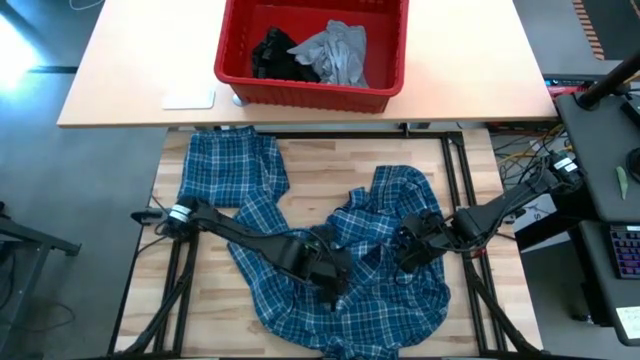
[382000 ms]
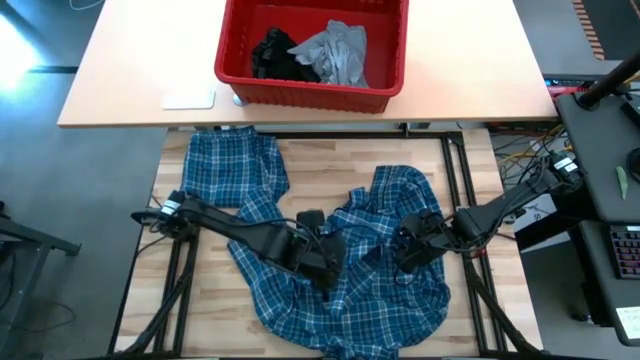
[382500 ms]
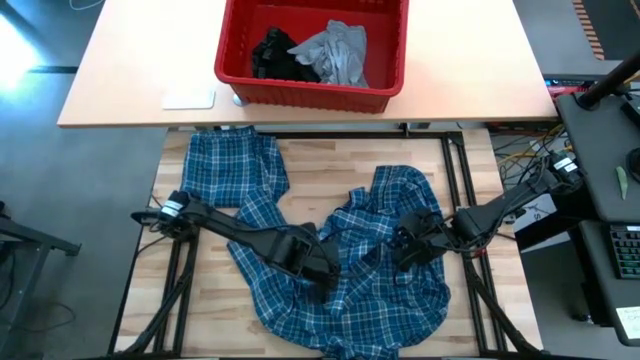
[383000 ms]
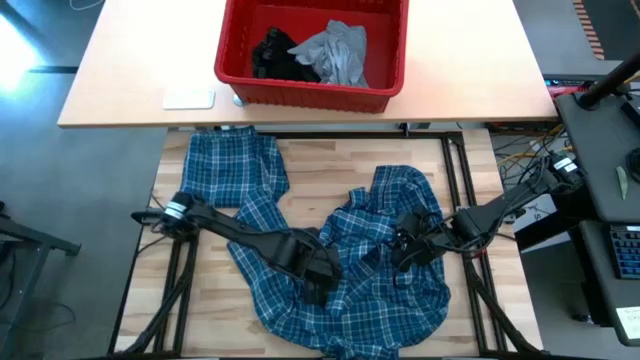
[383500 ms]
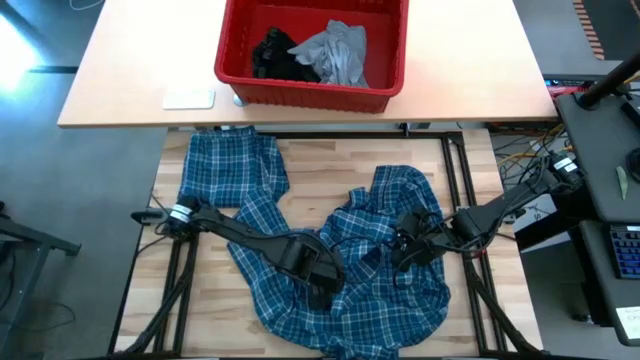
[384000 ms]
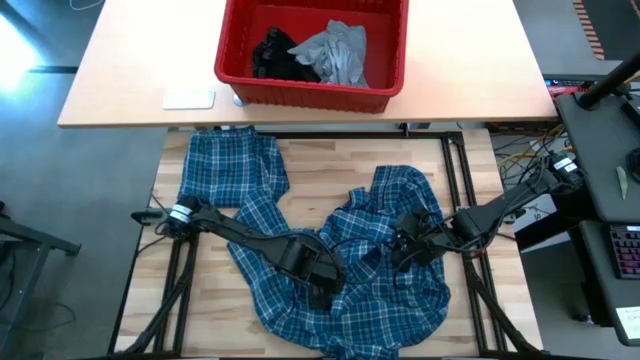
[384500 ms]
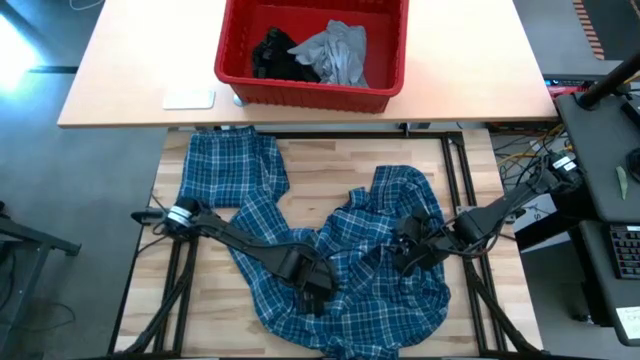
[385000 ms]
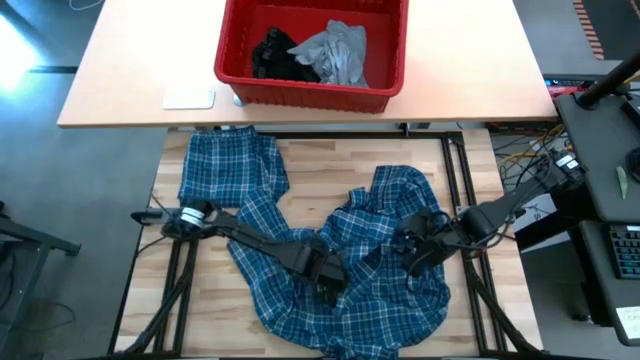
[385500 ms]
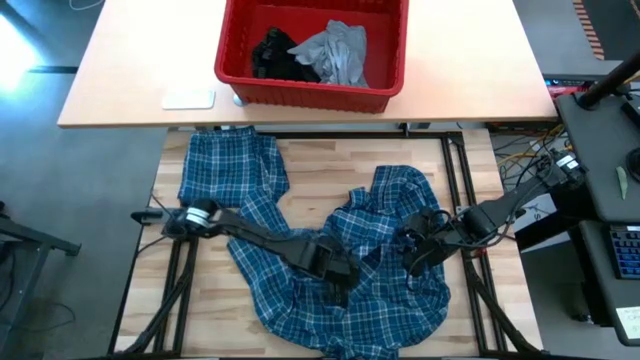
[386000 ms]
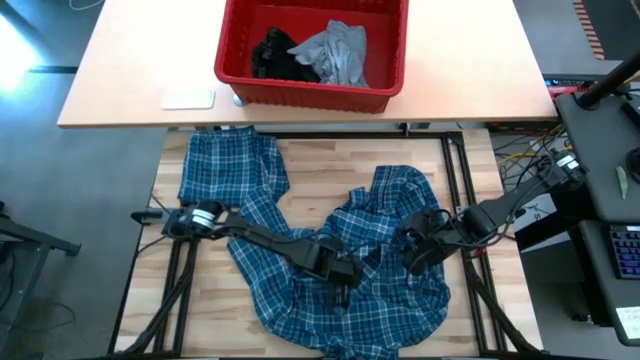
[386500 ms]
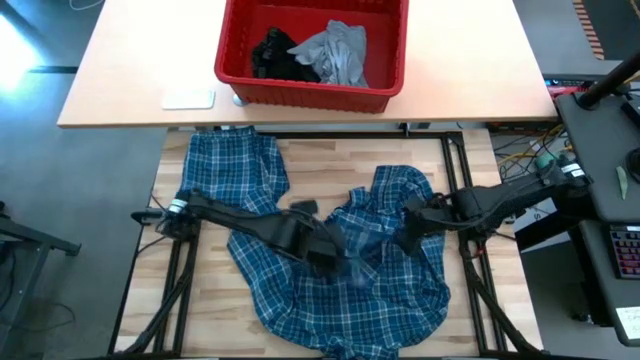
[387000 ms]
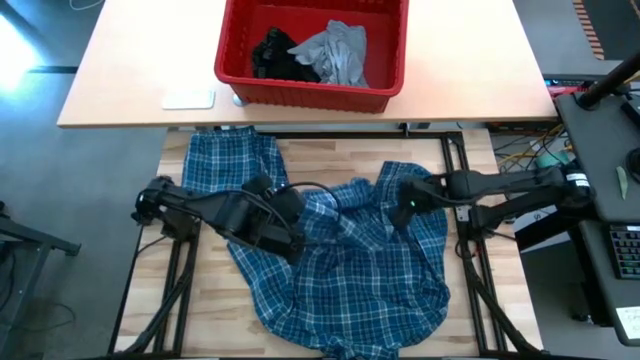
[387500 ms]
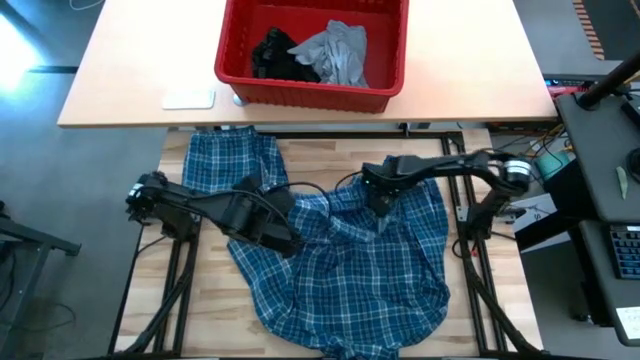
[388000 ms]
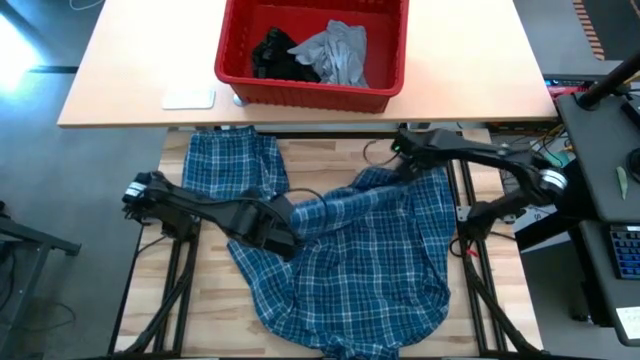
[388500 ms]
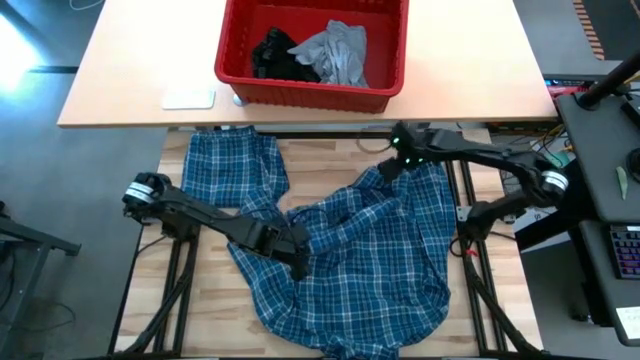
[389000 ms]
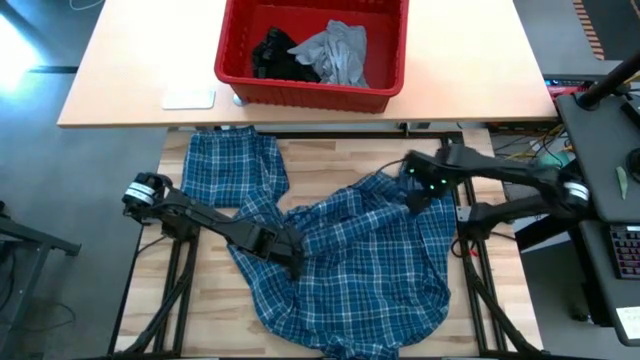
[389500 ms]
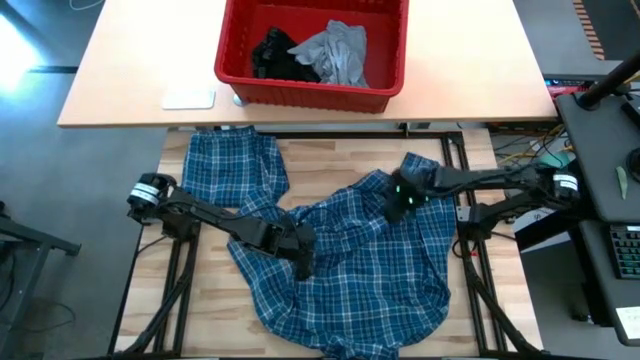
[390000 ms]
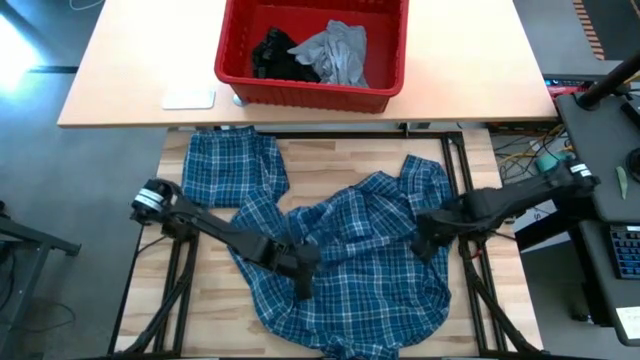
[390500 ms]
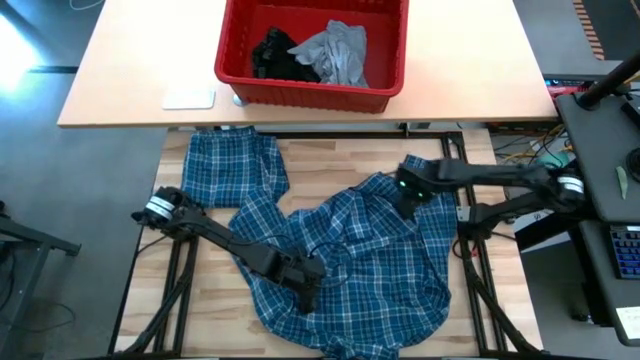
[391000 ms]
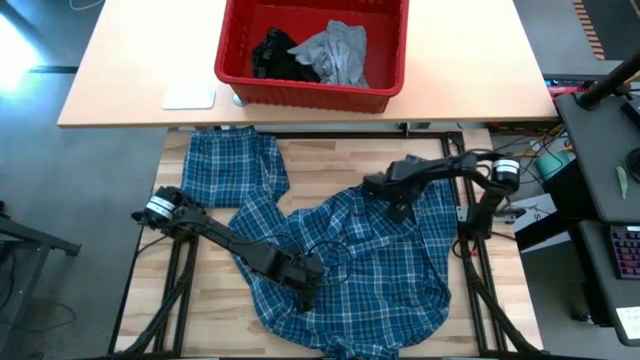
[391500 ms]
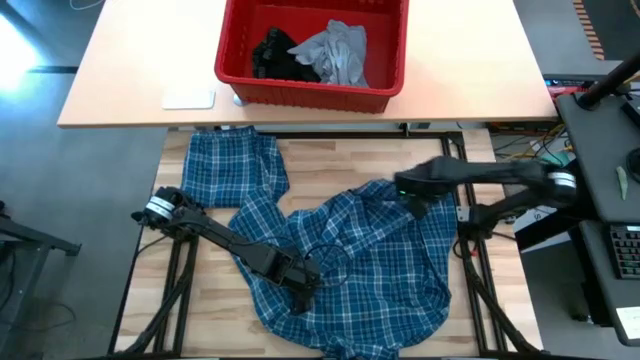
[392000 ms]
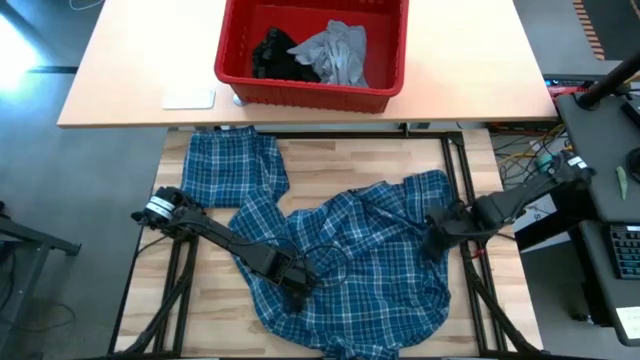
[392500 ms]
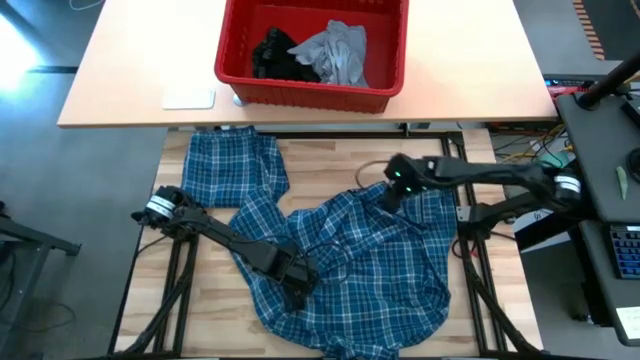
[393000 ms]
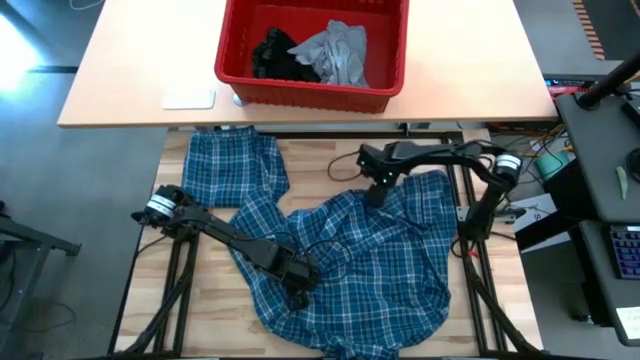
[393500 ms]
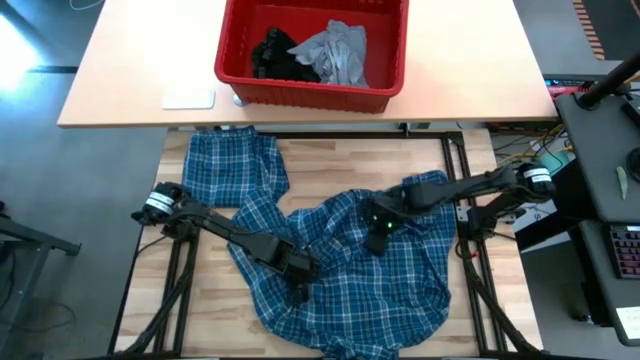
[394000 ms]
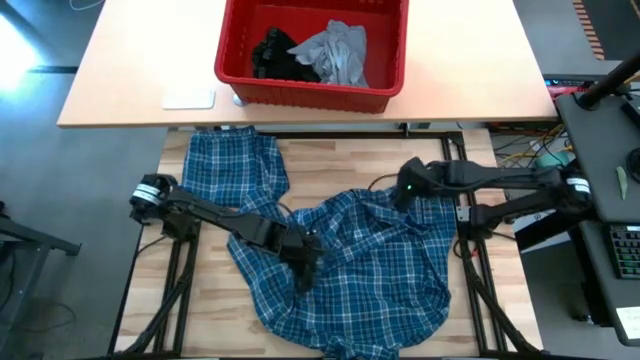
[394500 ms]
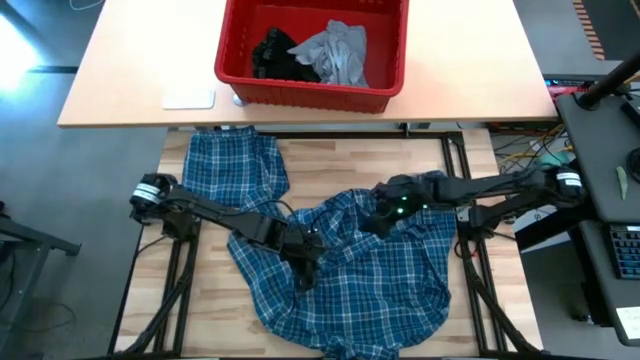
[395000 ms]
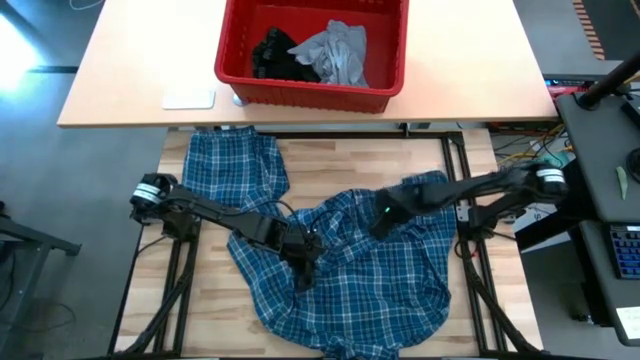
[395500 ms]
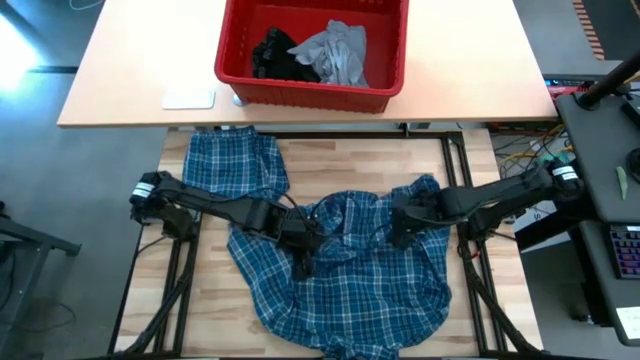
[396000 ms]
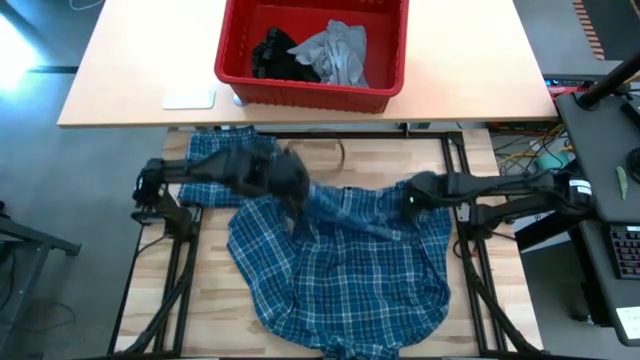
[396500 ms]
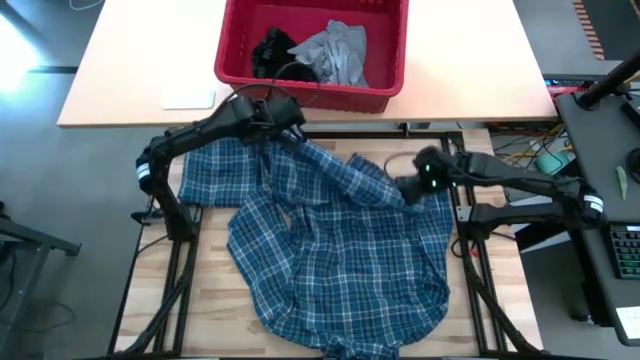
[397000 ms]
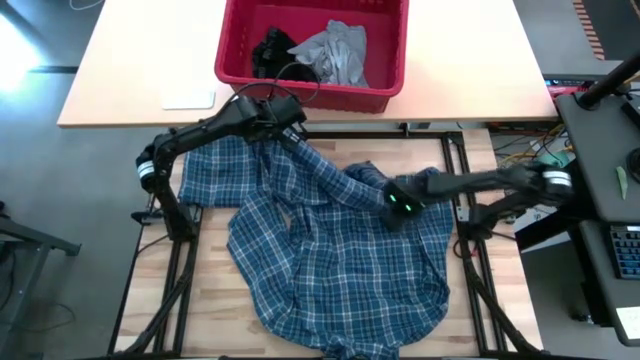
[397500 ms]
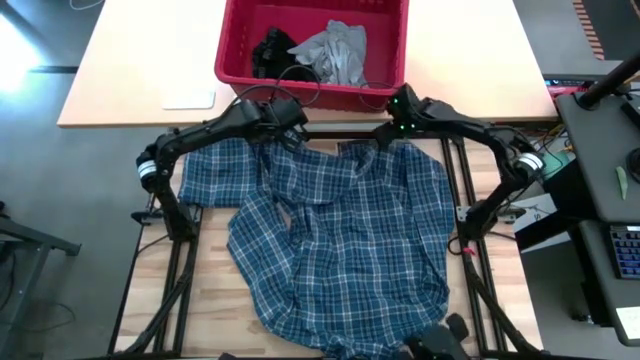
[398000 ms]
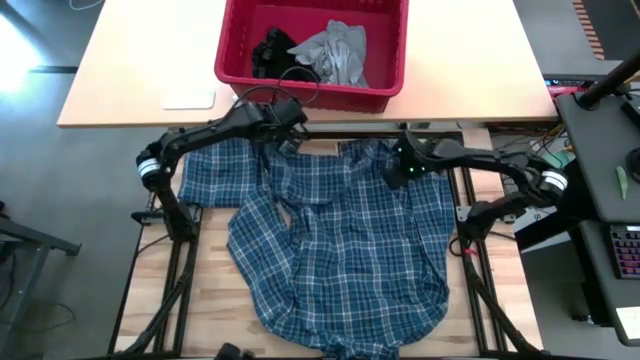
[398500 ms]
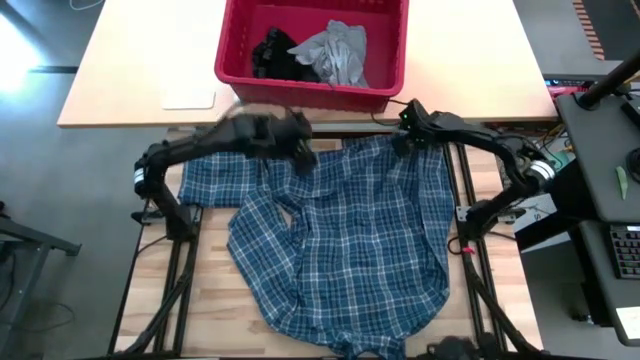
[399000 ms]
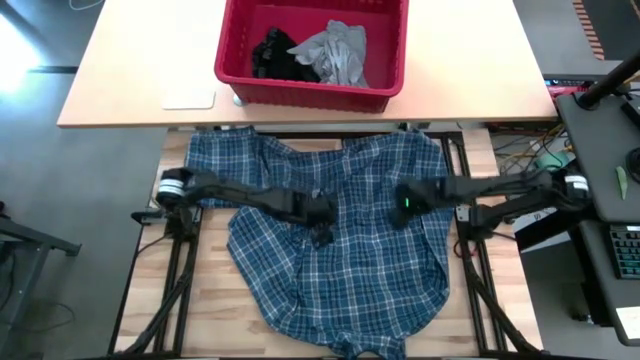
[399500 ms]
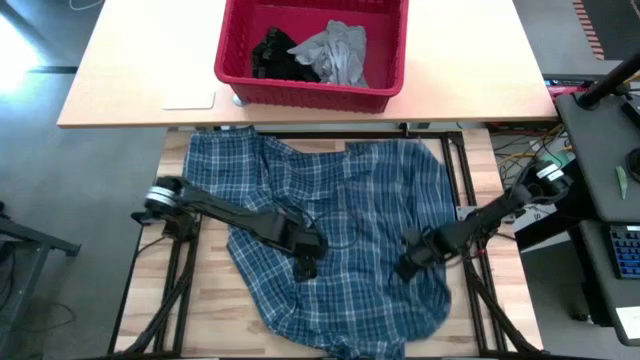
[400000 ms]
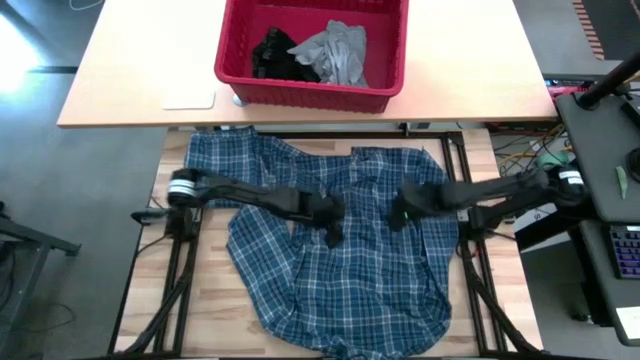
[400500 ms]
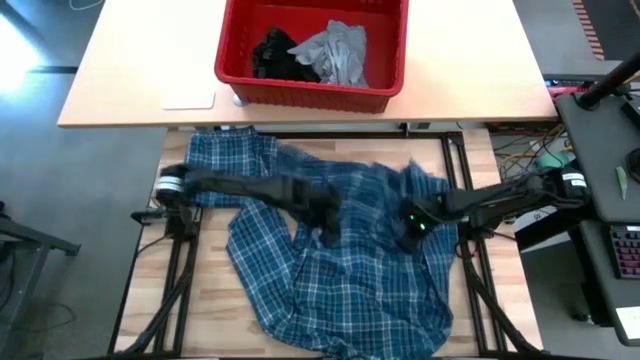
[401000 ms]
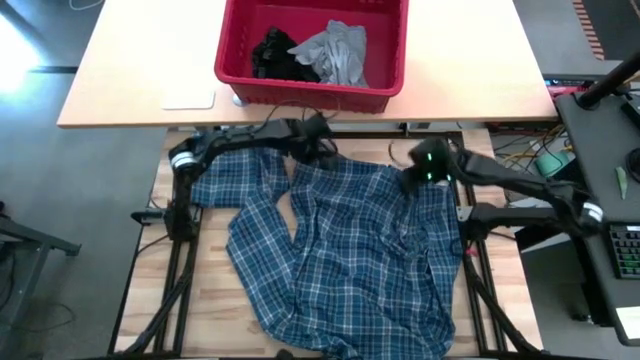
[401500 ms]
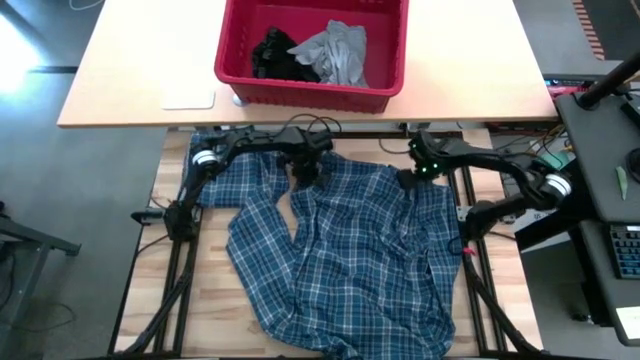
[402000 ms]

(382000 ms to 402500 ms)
Task: Fold Laundry from Bin
Fold the blue patterned long sleeve shirt

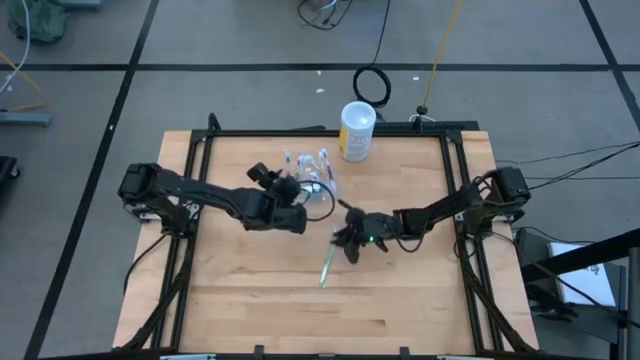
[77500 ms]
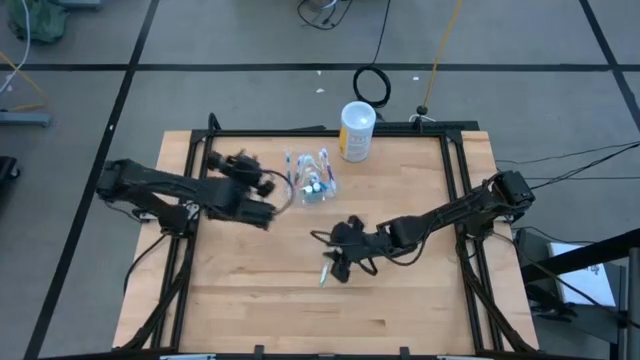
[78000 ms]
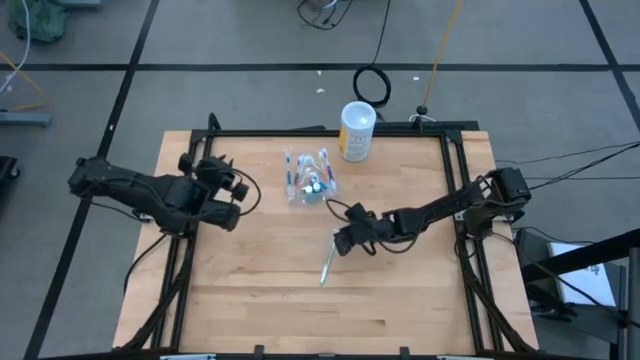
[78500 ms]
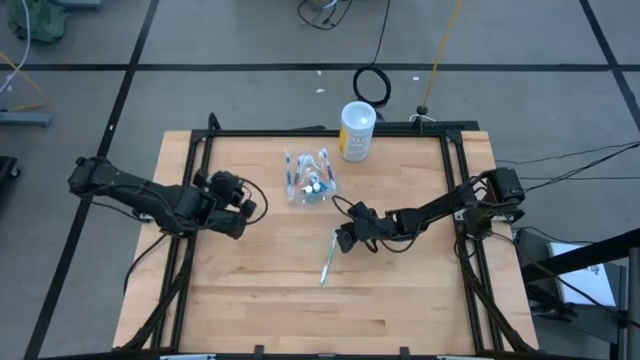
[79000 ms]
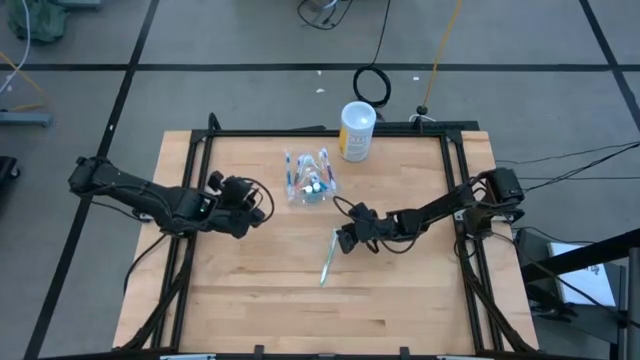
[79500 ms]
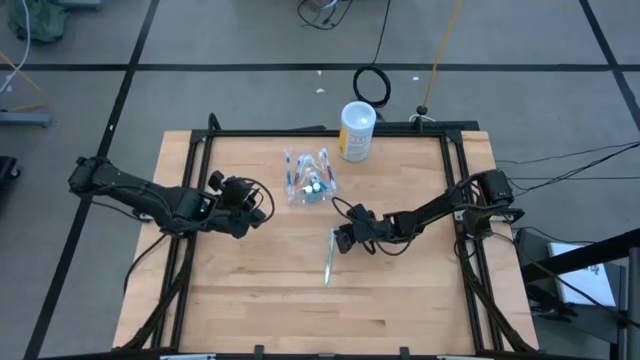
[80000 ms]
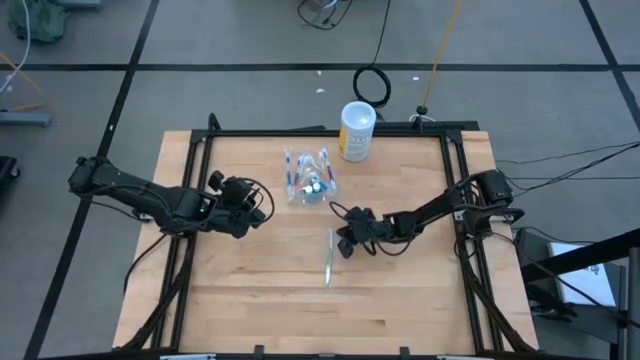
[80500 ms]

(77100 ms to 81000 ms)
Task: Pick & Place toothbrushing station
Put the green toothbrush into the transparent organizer
